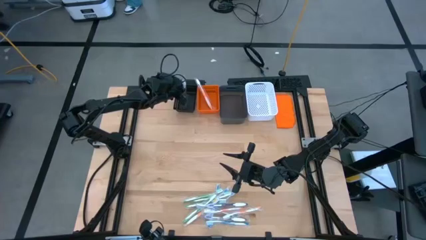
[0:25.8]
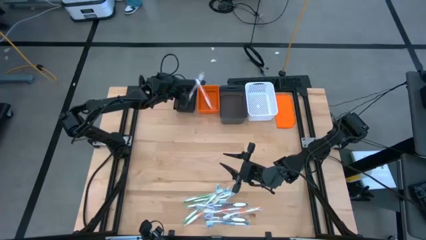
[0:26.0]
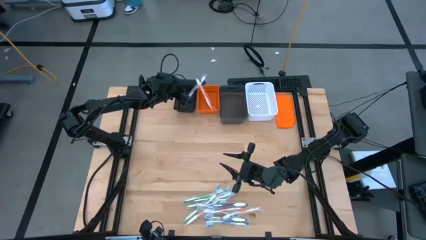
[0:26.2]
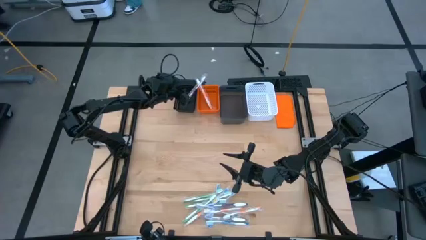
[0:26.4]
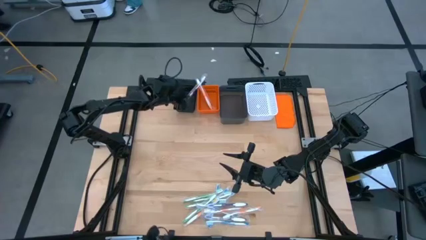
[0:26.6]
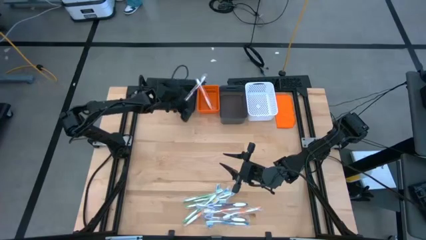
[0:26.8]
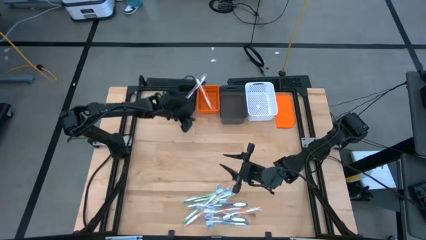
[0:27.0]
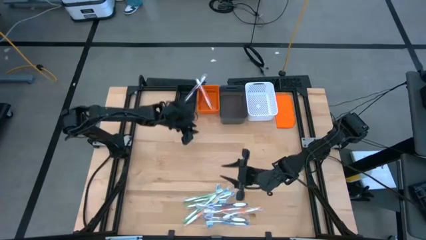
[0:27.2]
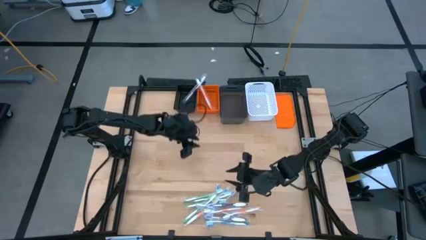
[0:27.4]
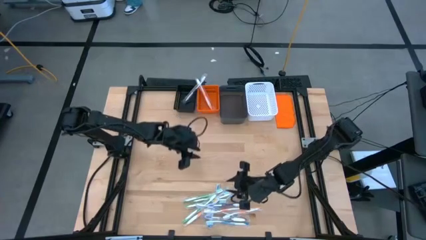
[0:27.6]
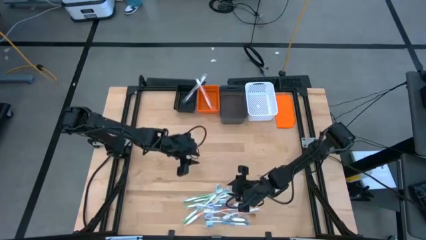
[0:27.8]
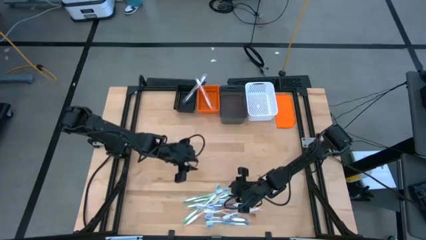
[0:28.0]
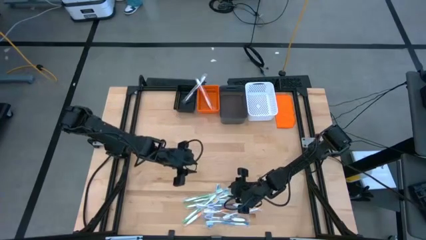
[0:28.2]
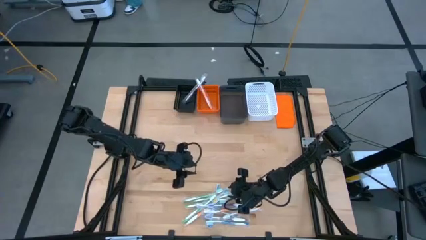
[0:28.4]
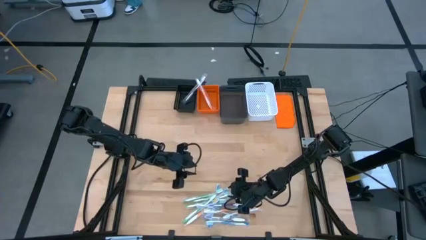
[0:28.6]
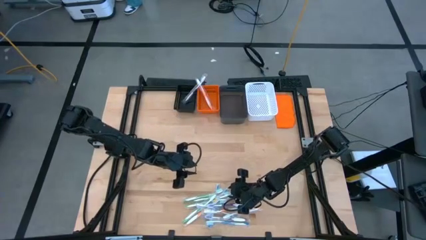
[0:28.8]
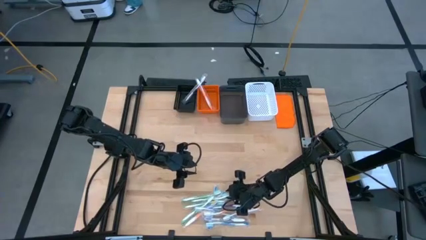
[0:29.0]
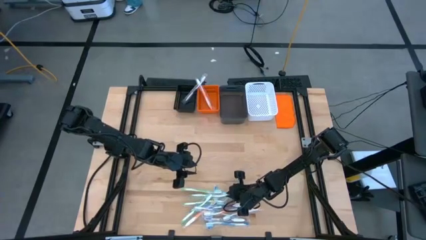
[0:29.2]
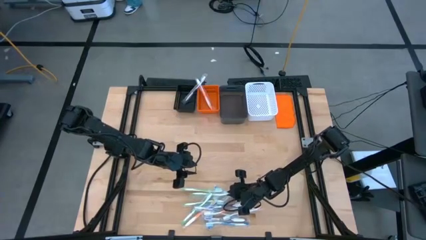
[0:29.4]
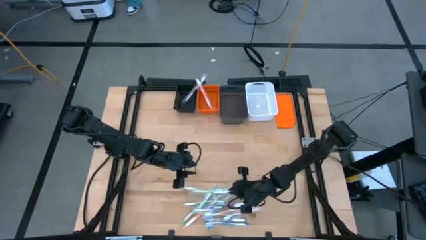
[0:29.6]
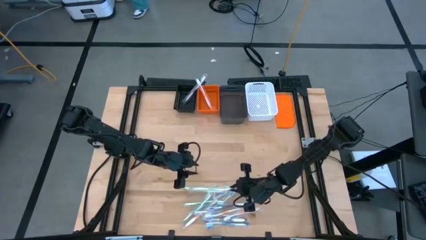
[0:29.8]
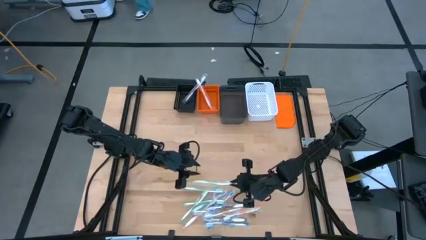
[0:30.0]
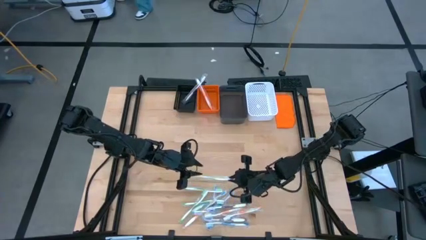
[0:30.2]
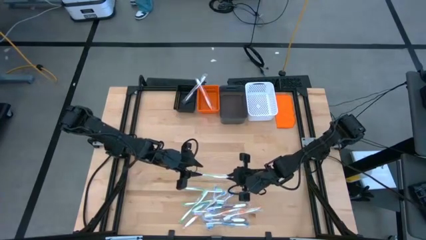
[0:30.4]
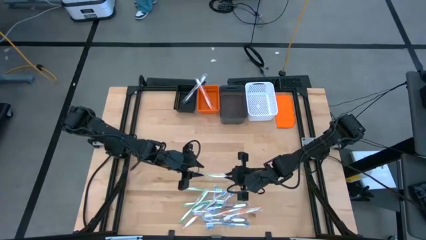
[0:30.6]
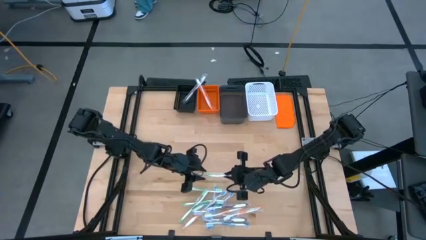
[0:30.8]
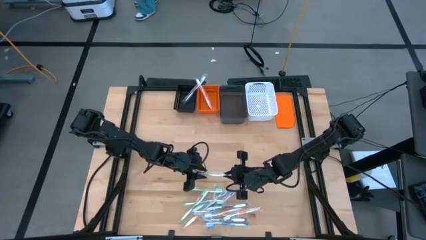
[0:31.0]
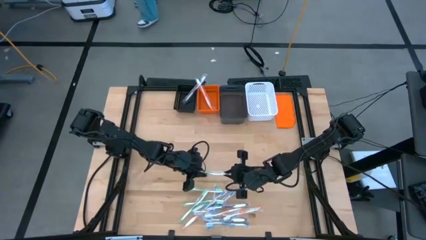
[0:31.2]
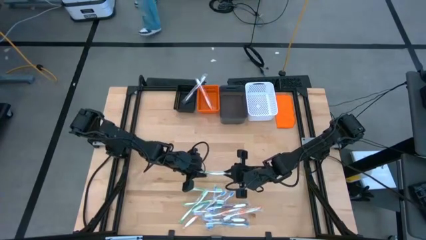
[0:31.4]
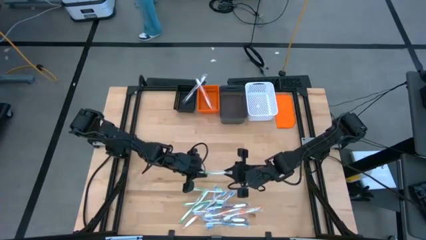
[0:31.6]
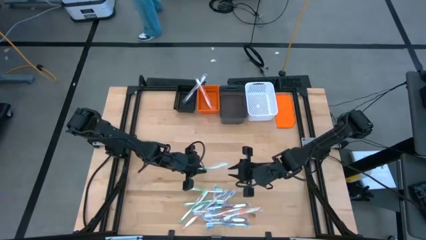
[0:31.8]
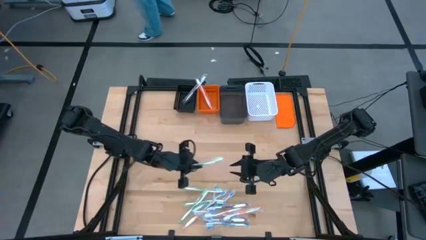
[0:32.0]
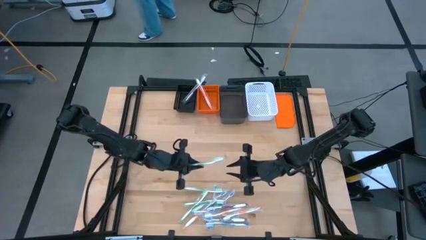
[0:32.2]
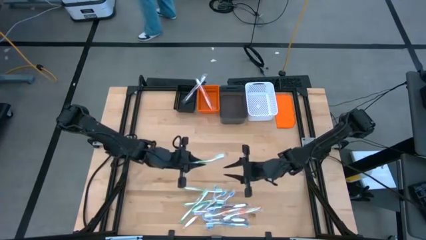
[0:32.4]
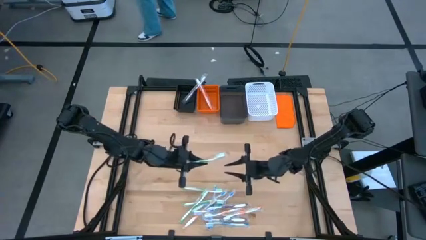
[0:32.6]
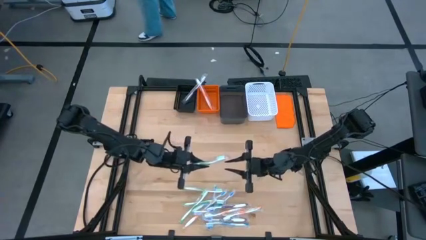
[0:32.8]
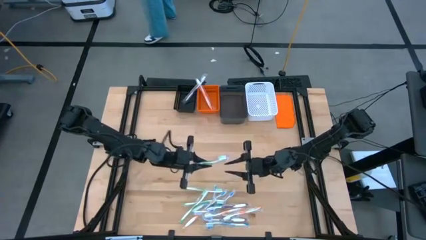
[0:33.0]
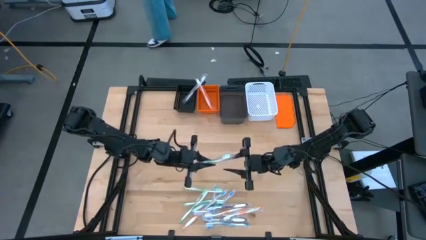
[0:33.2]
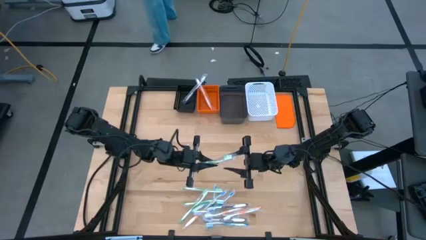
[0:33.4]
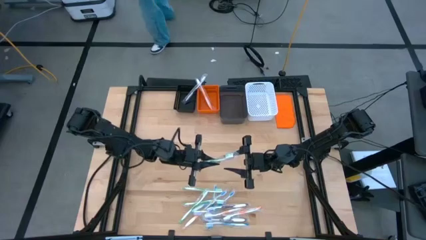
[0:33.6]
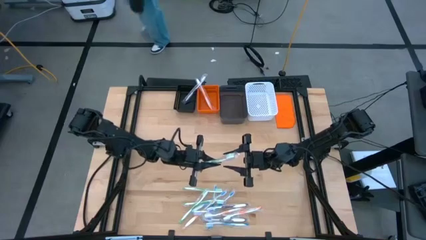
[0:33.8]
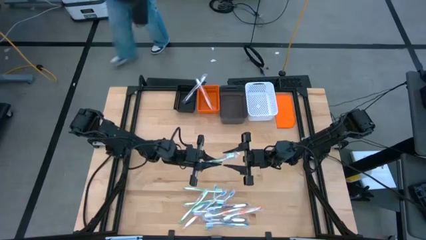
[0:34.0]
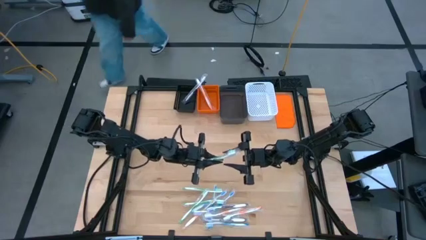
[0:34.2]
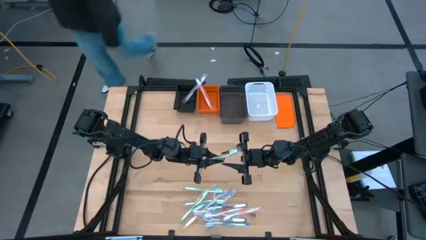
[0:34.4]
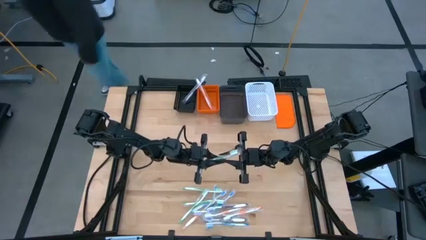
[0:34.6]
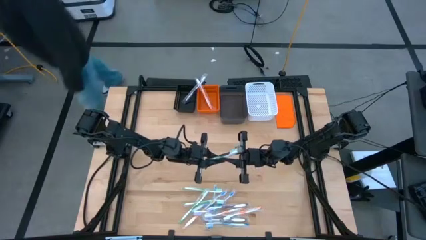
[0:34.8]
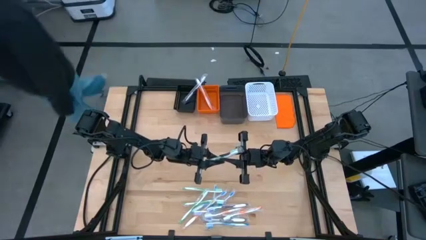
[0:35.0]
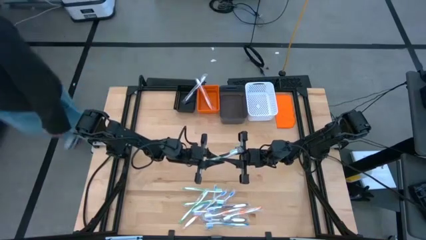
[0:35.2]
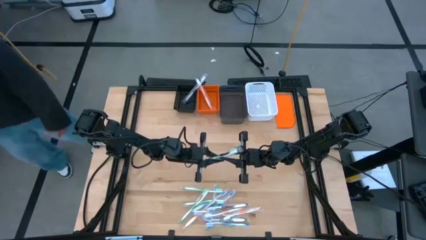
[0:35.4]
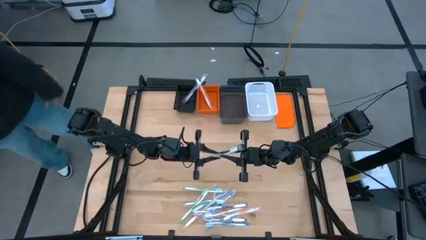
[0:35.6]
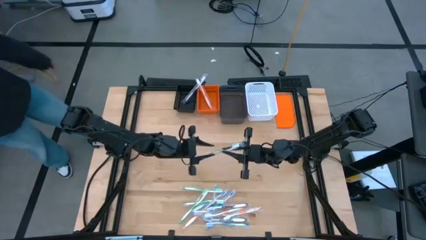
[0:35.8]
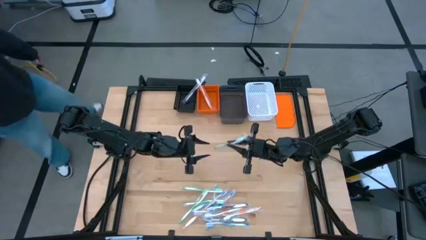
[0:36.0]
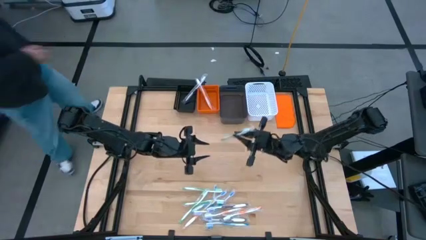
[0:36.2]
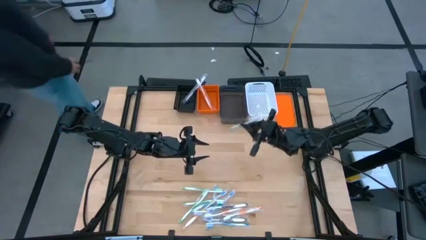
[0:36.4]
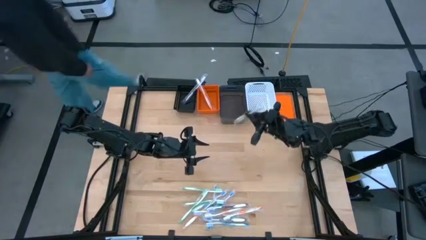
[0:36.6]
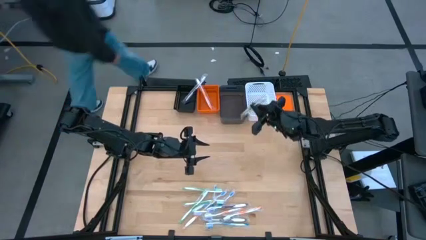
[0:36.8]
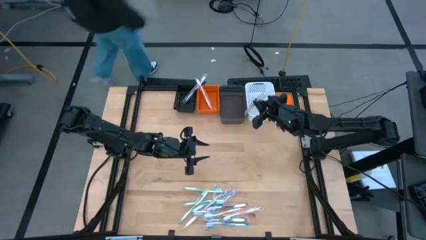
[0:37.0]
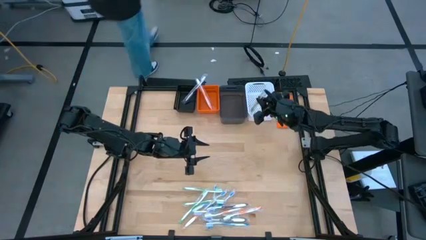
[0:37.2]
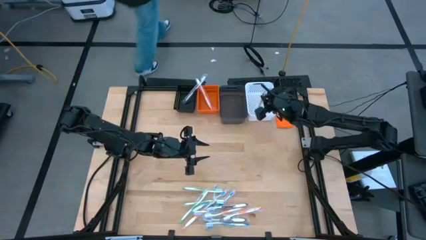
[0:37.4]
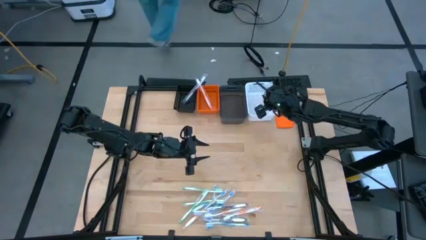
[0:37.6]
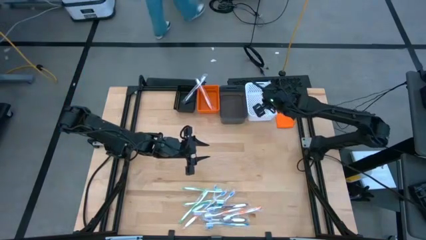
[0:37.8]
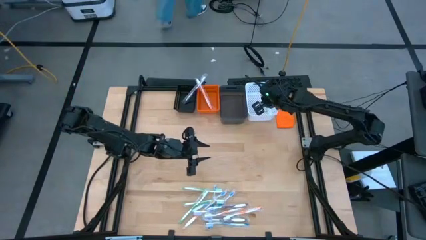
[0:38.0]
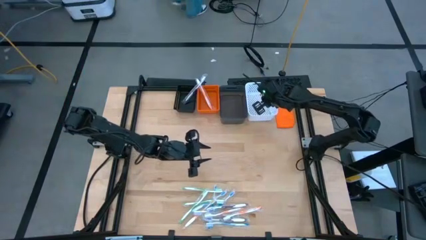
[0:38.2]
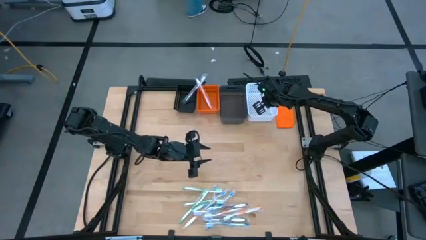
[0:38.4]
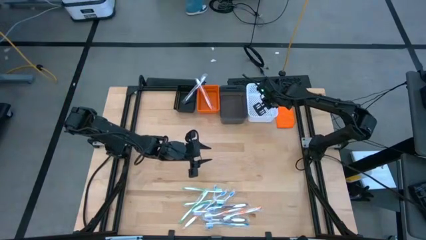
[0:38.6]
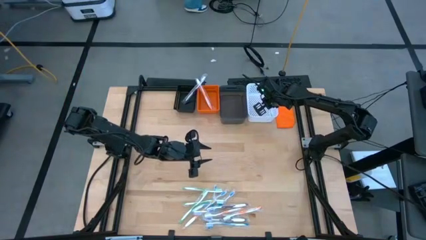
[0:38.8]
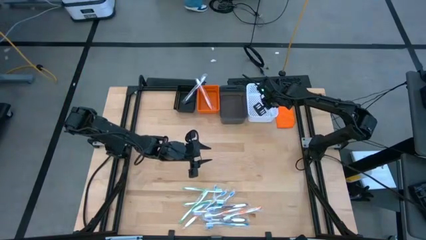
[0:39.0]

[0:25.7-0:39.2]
Task: Pick & Place Toothbrushes
Put the green toothbrush into the white bin

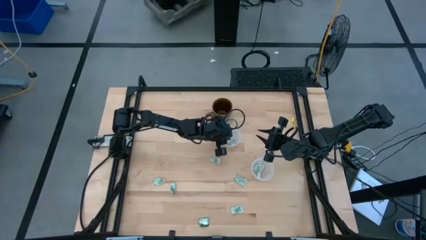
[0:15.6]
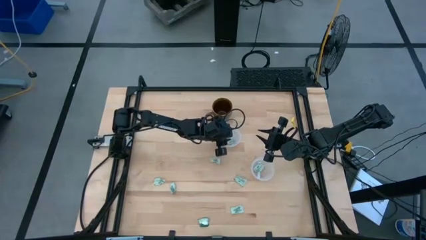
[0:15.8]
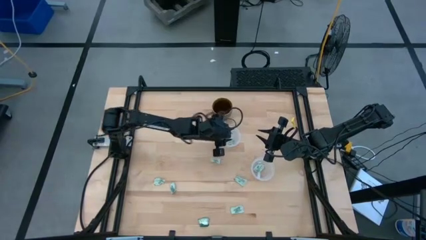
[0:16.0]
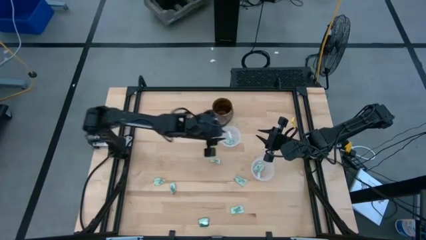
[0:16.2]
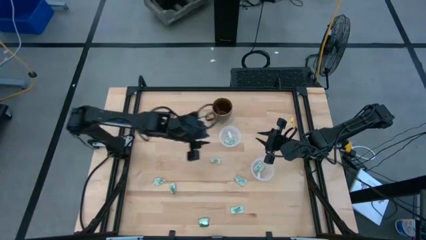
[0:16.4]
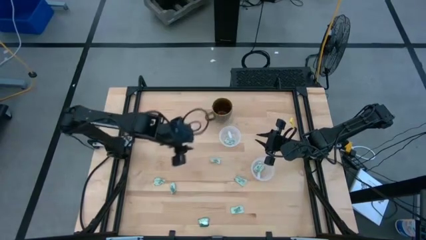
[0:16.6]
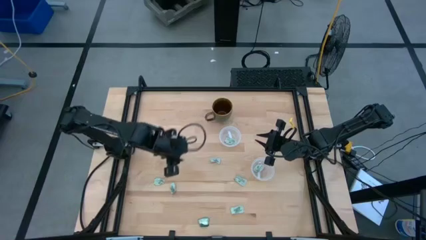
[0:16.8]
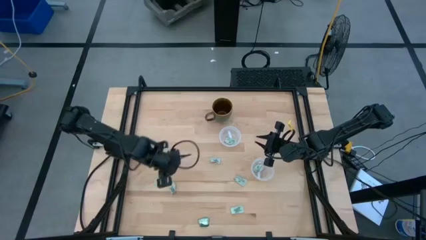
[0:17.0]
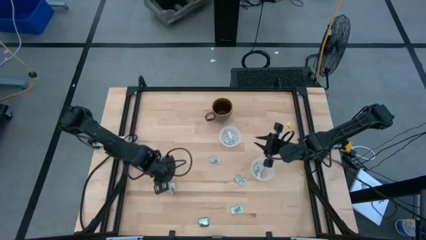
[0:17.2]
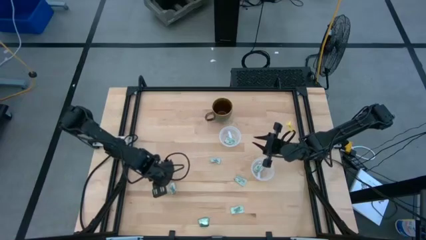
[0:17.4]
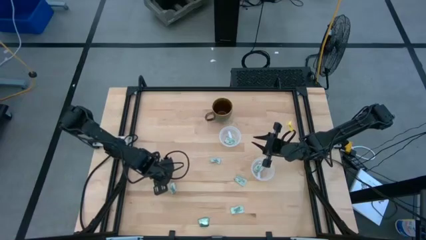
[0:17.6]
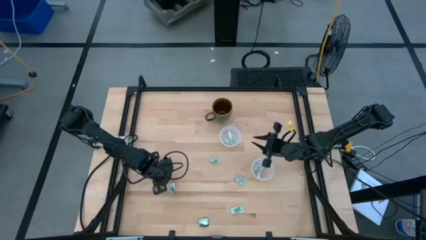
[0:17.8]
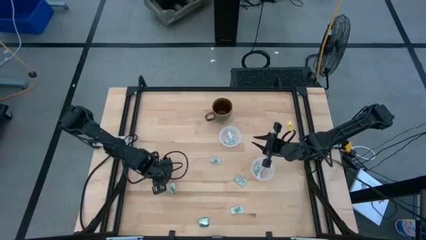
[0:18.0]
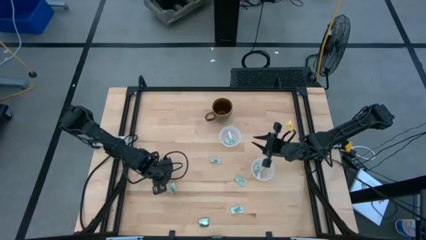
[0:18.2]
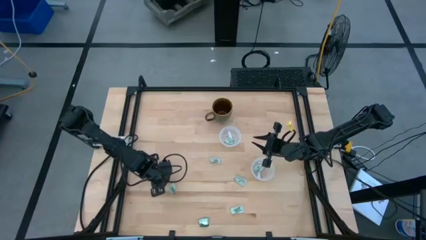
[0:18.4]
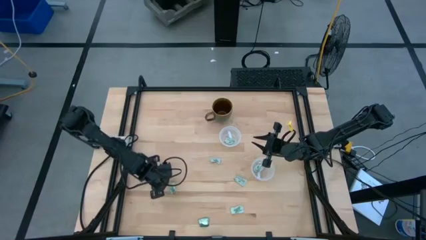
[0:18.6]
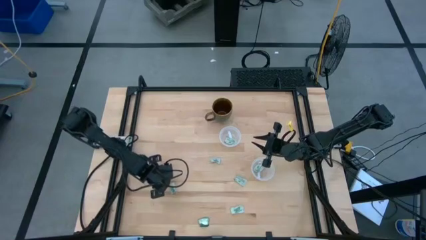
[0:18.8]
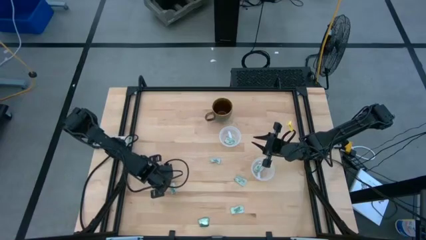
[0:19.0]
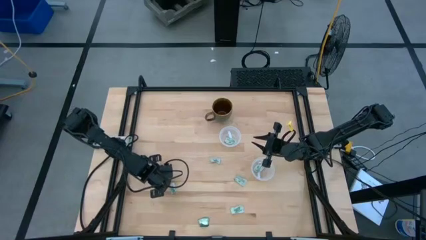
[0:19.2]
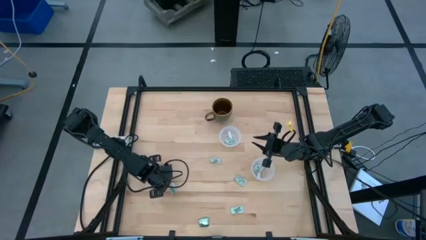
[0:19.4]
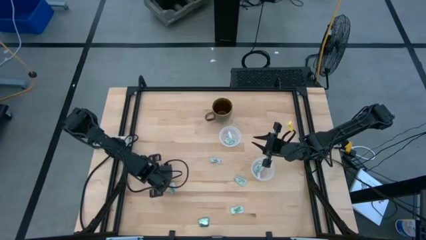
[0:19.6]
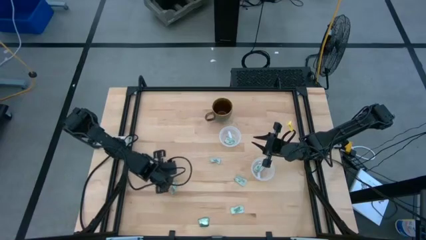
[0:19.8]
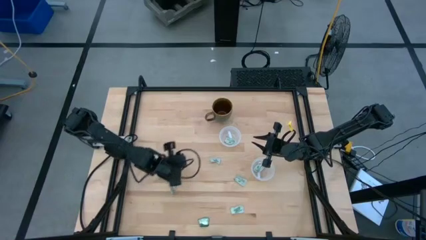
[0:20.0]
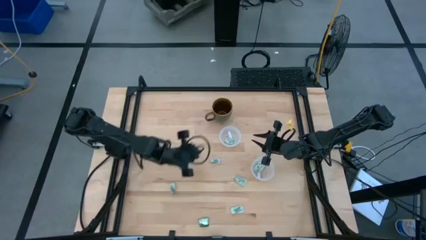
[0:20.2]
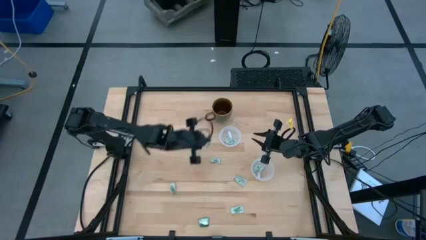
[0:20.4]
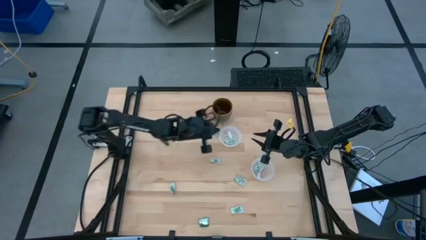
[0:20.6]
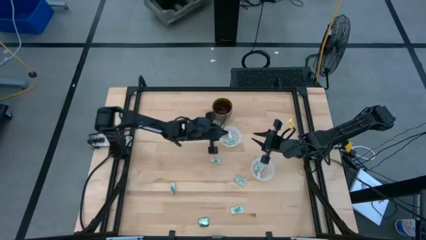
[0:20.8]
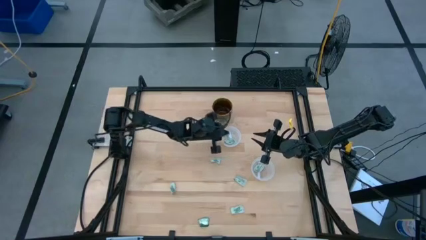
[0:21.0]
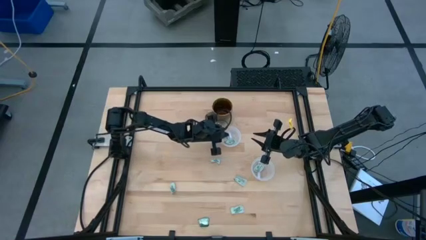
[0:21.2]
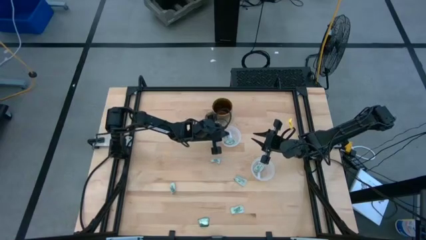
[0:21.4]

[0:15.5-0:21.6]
Task: Pick and place items into bin
Put the stevia packet into the top transparent bin
